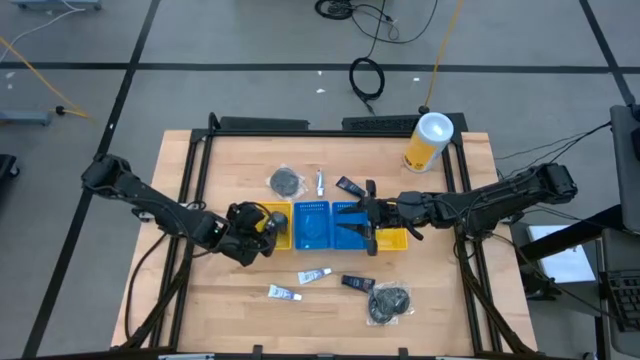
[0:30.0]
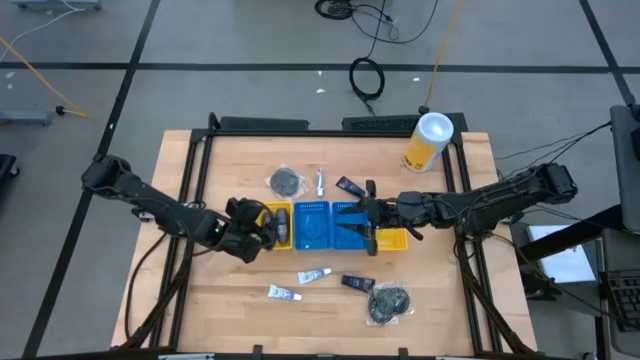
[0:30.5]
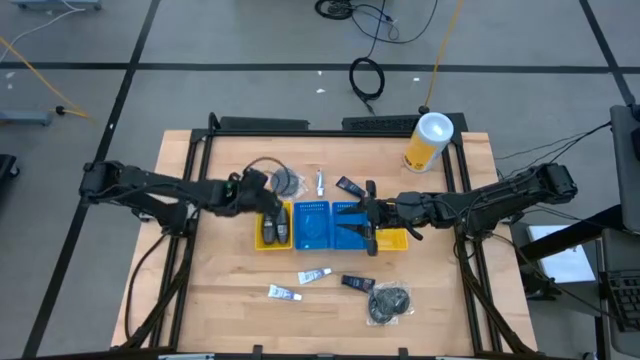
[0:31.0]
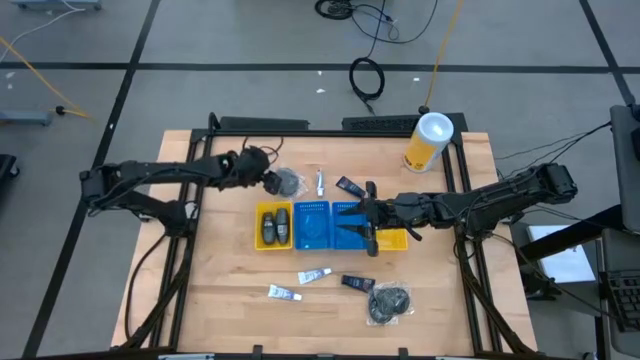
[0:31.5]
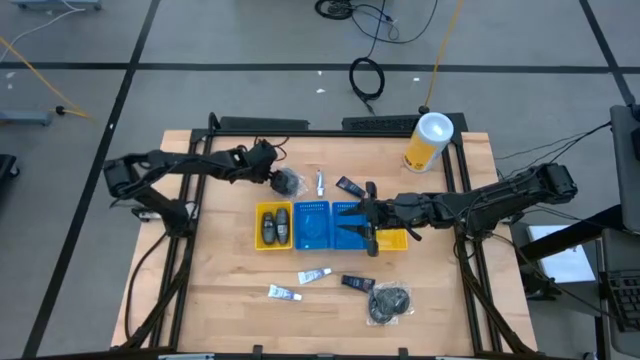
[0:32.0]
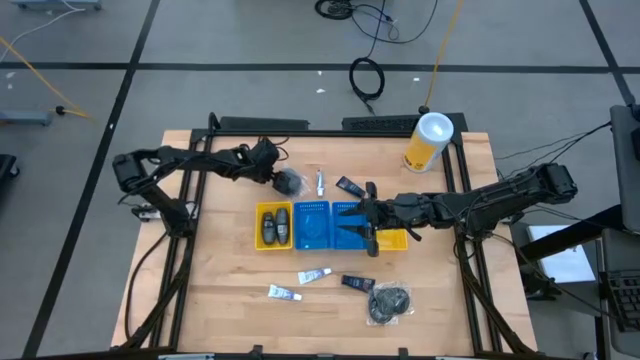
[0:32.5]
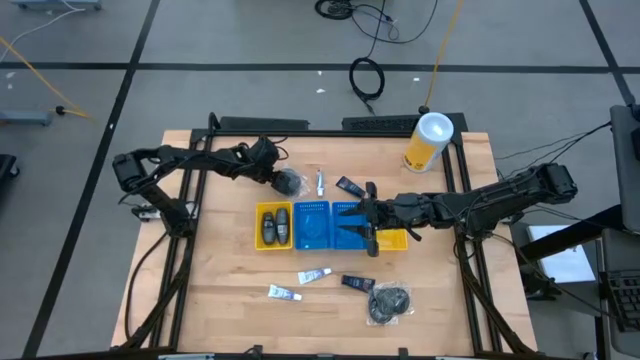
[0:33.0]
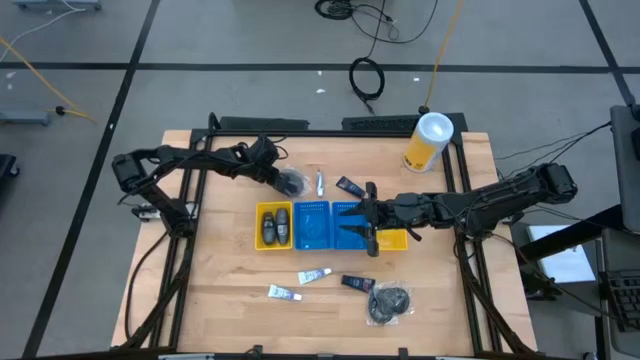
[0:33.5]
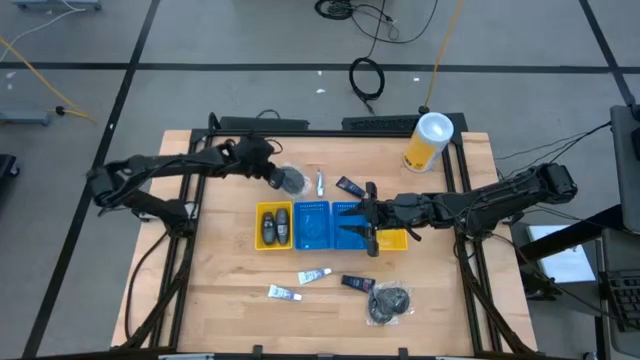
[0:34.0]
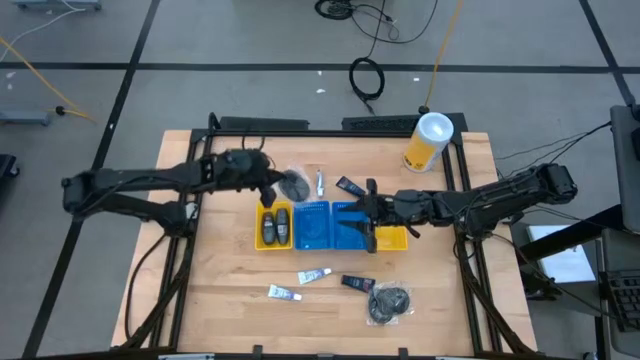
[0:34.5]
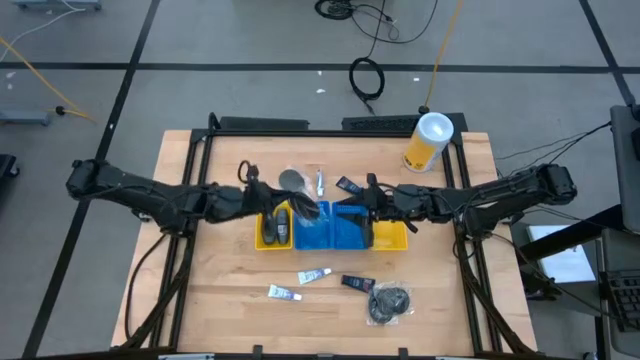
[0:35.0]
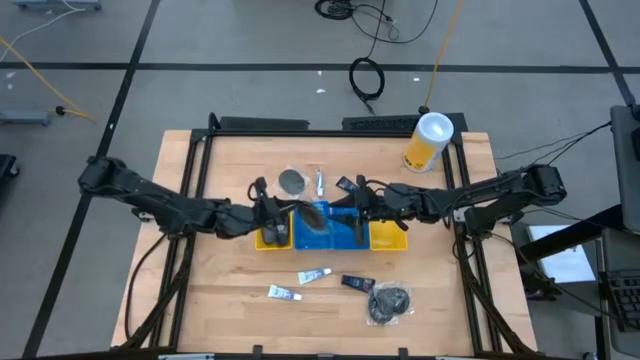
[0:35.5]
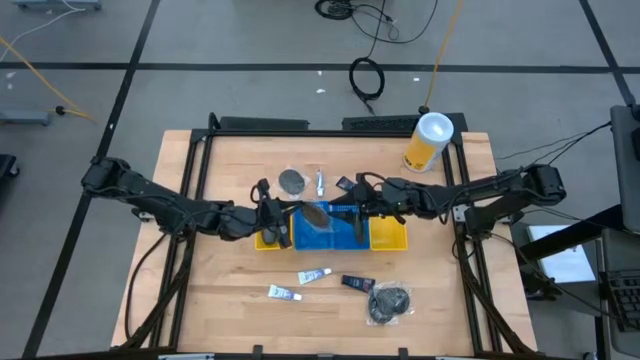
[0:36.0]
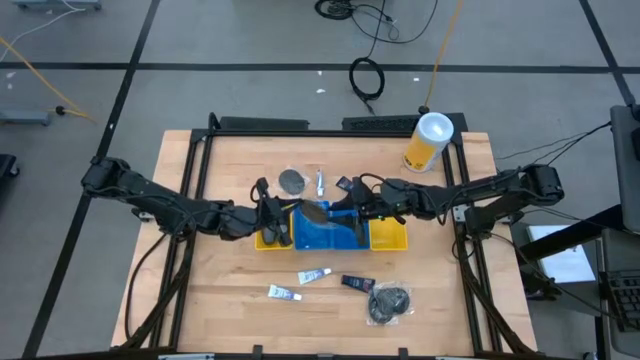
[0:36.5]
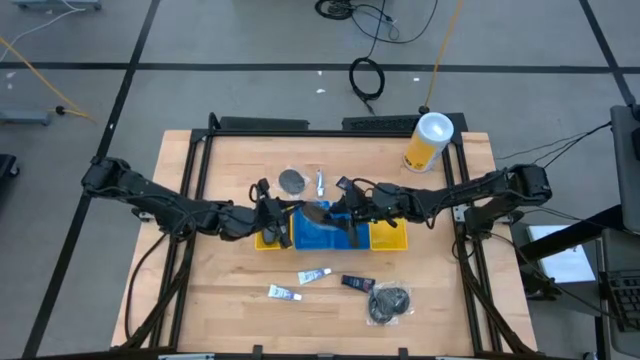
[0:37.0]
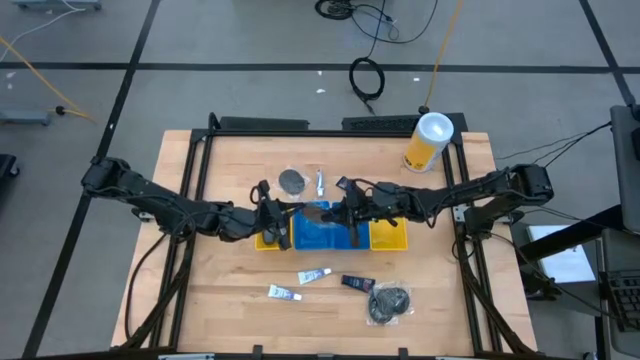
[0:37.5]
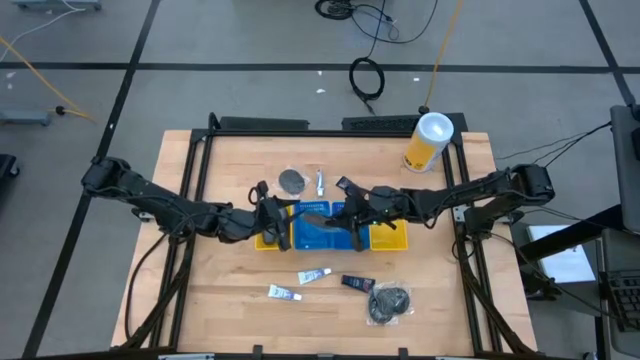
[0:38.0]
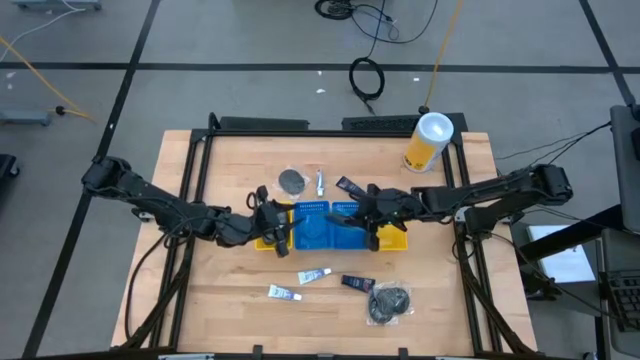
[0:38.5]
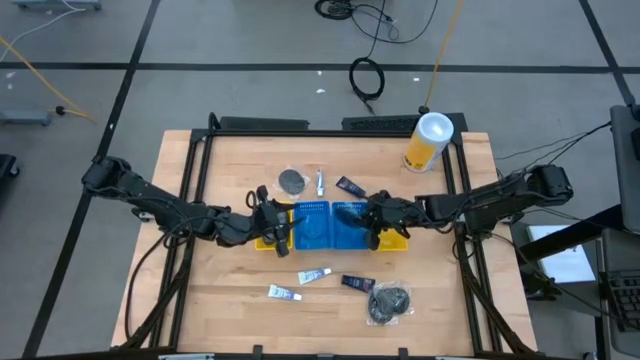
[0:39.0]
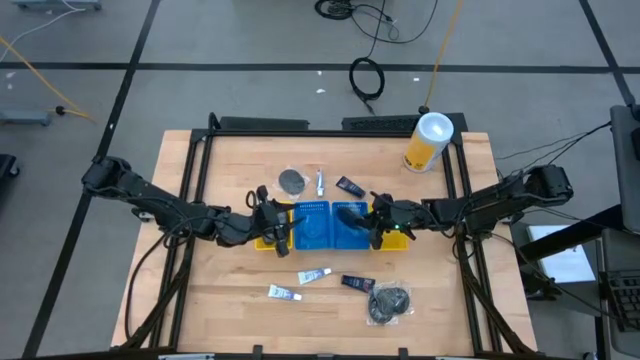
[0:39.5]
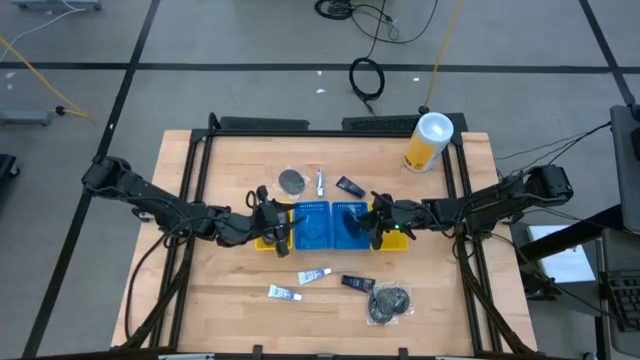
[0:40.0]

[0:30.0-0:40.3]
Task: Pick & Place Travel size toiletries
Put the hairbrush into the right blue bin

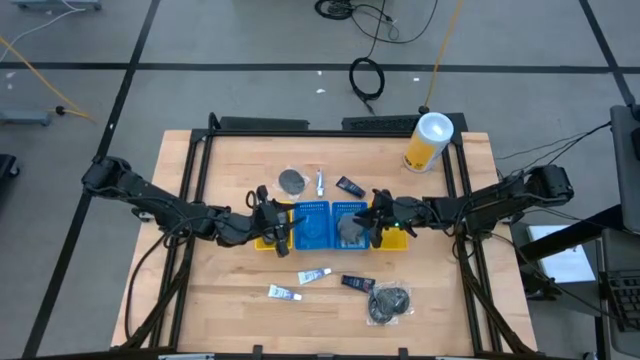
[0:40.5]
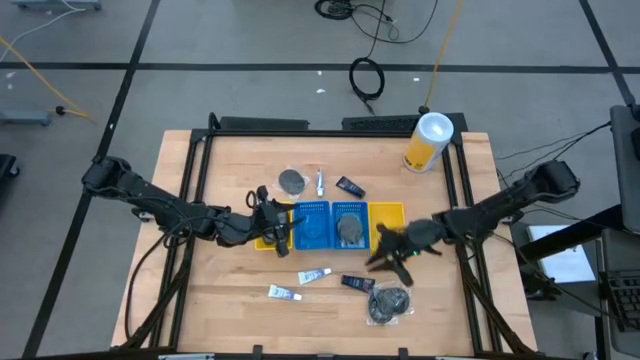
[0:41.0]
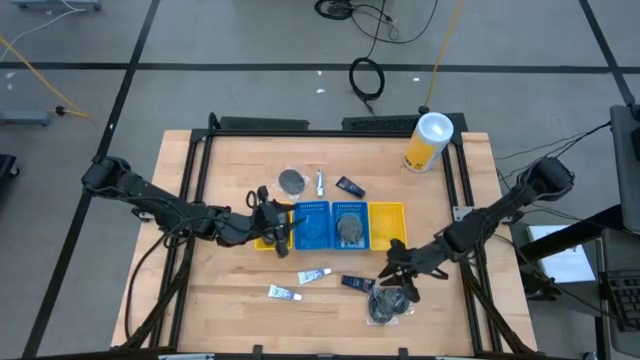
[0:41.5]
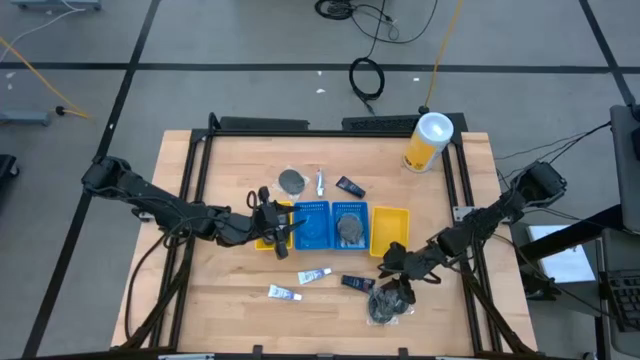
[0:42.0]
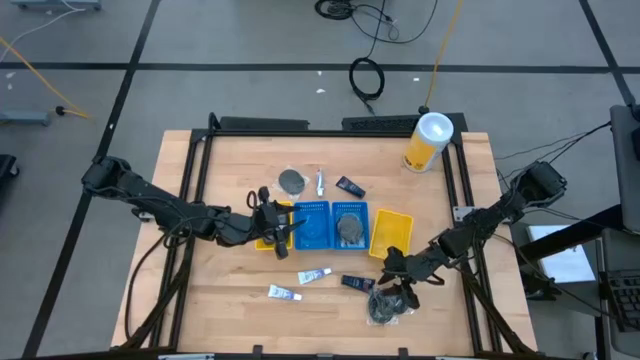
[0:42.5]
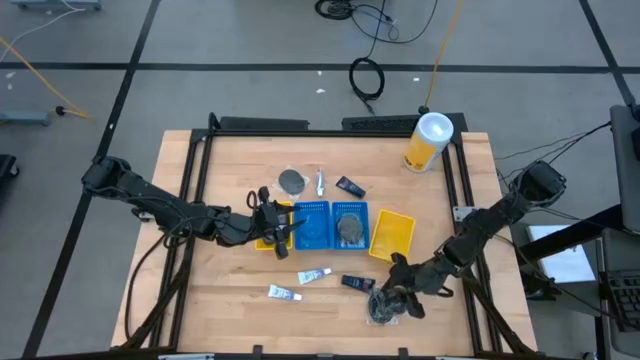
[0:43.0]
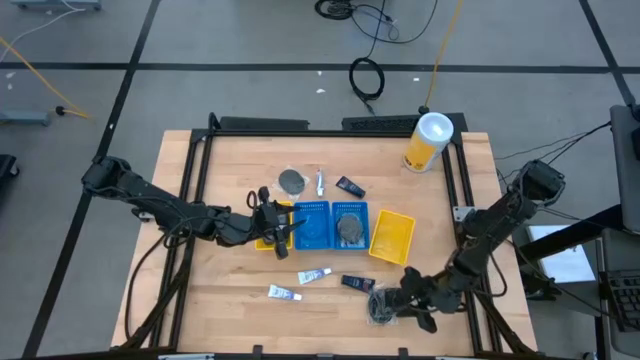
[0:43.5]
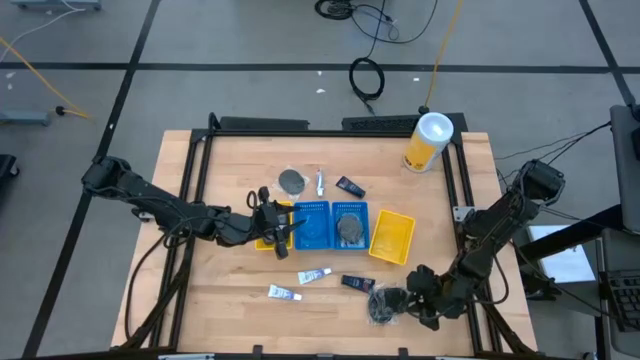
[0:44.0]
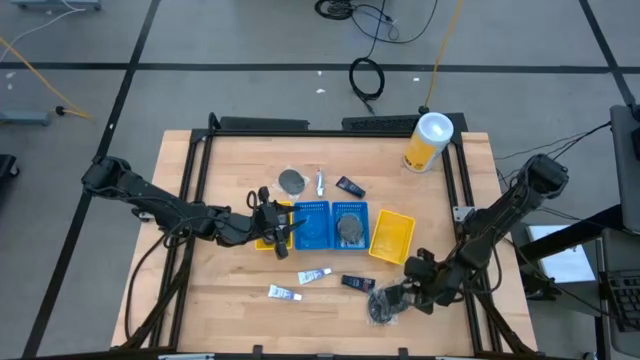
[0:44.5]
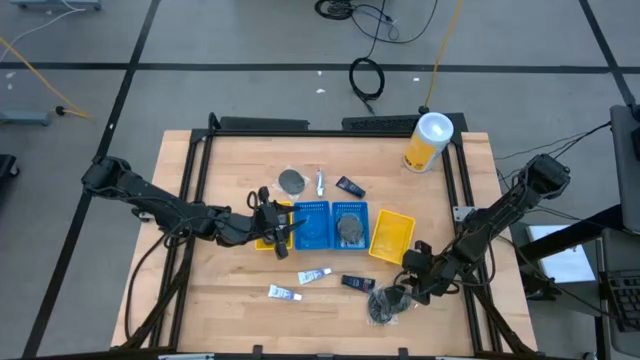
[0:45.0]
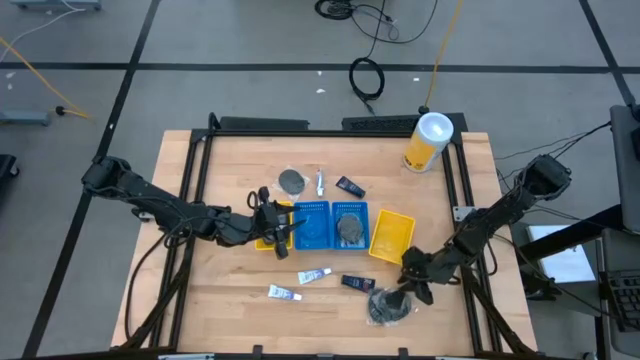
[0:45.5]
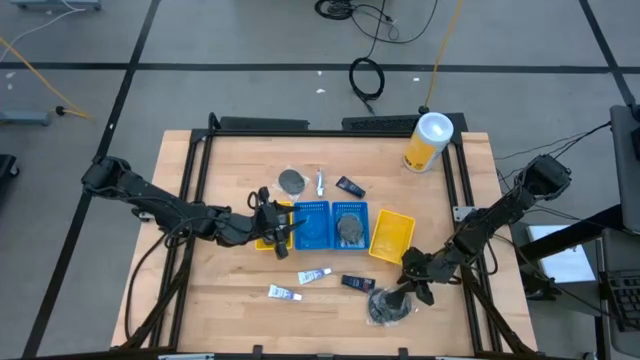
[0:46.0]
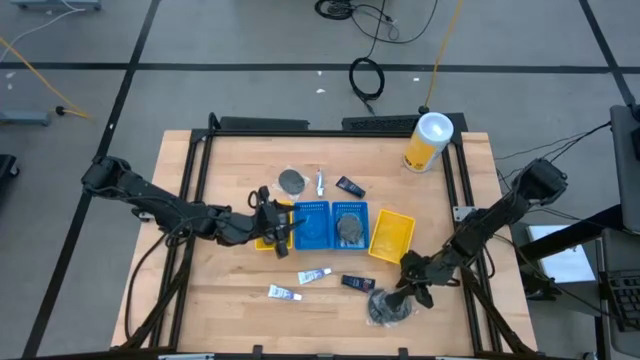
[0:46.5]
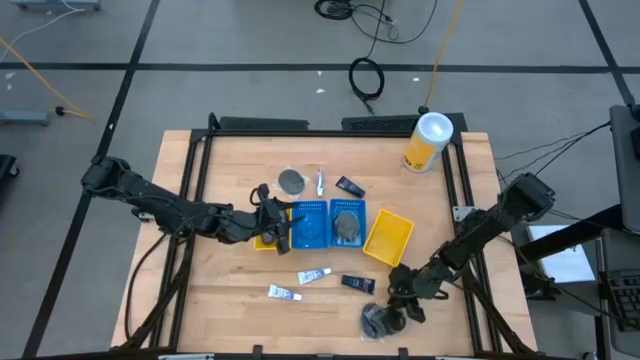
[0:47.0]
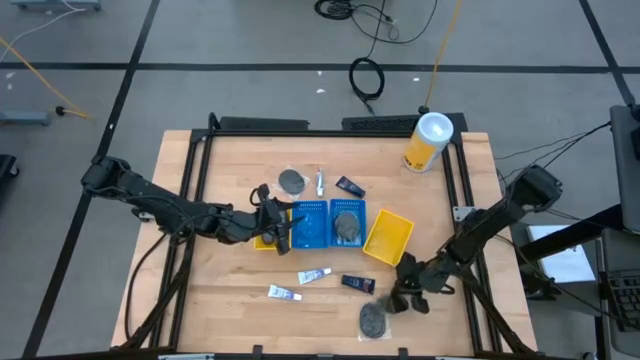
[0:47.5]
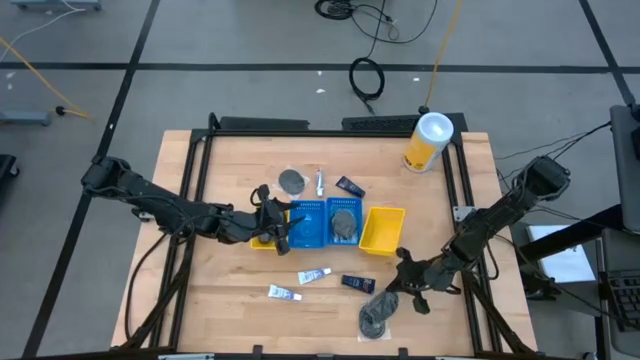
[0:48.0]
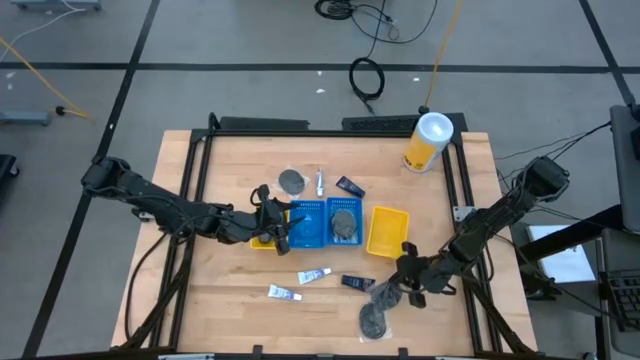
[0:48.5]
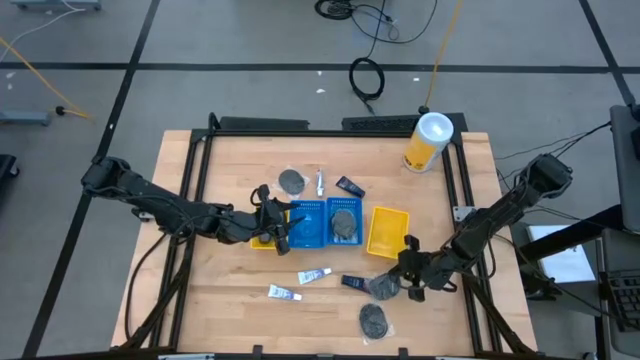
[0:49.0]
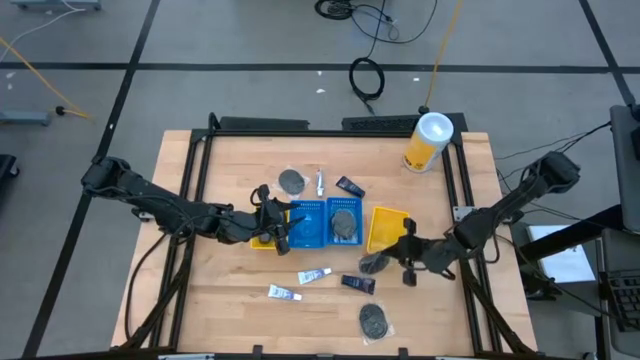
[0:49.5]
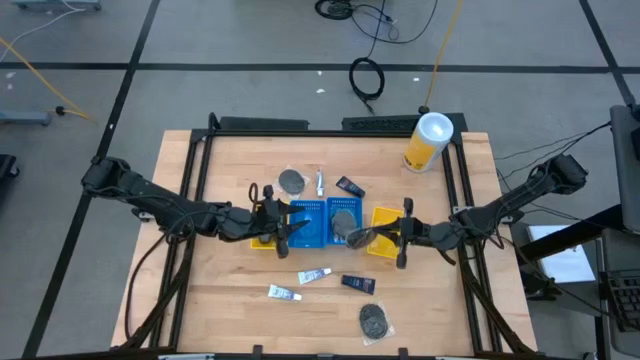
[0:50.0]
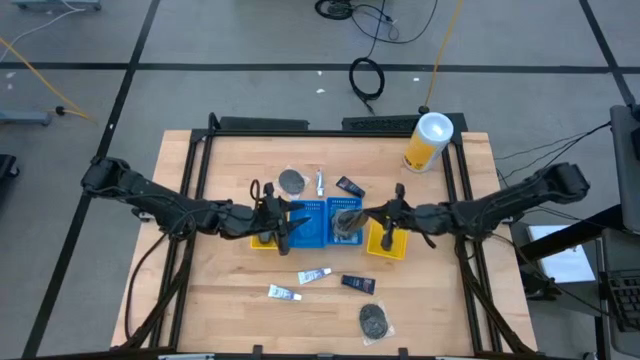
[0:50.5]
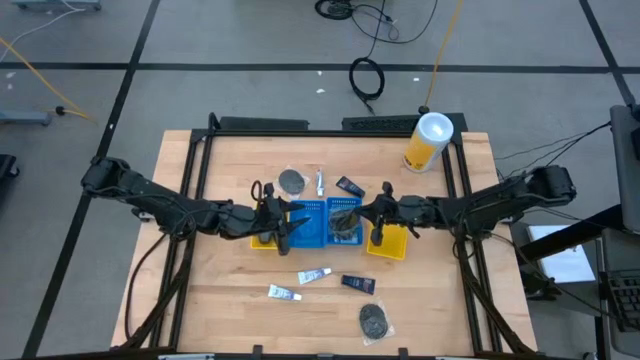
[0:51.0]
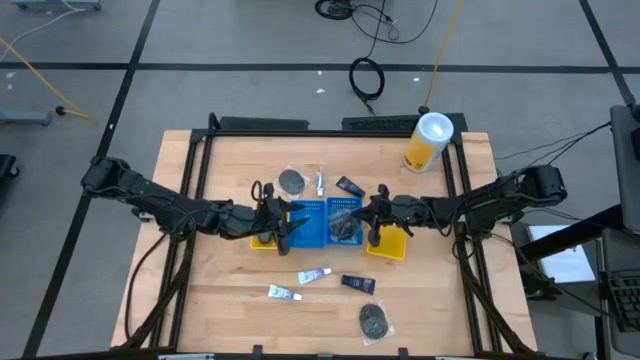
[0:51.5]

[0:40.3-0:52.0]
Put the hairbrush into the right blue bin
